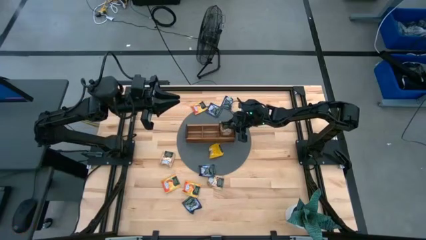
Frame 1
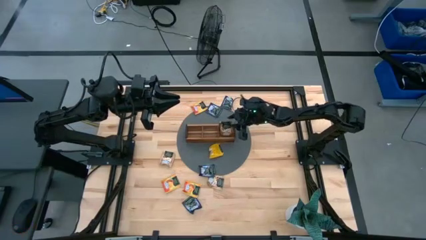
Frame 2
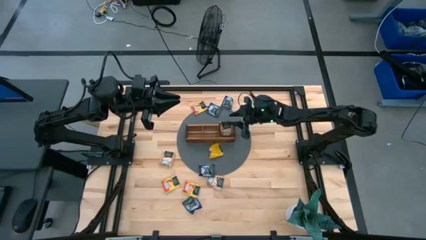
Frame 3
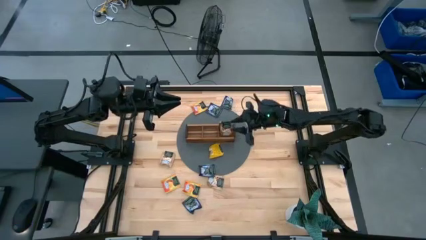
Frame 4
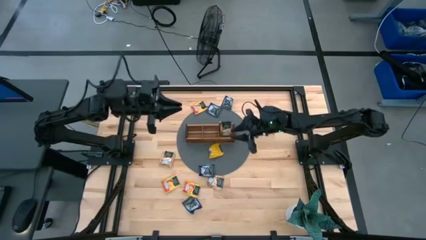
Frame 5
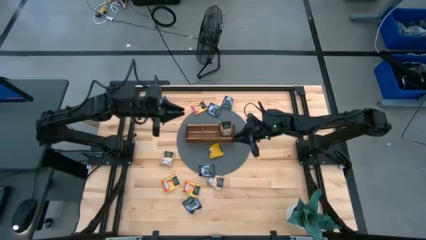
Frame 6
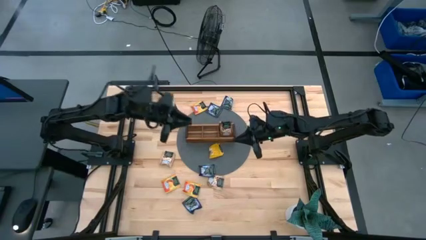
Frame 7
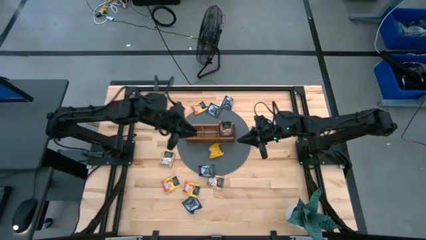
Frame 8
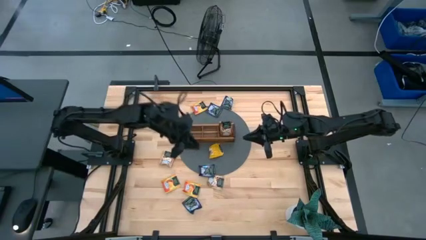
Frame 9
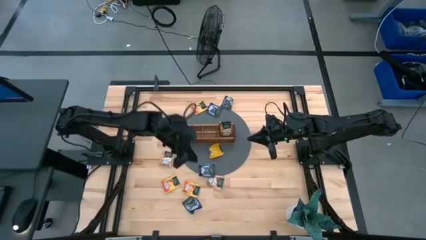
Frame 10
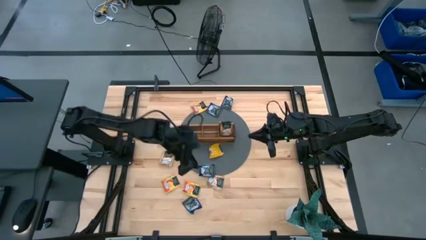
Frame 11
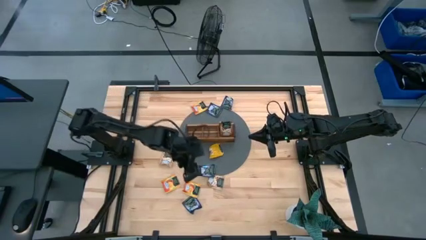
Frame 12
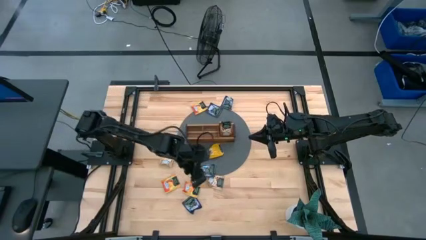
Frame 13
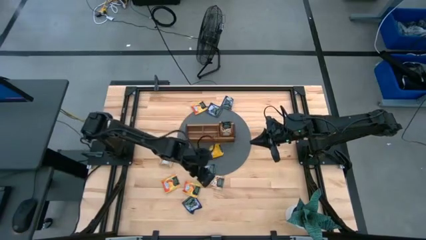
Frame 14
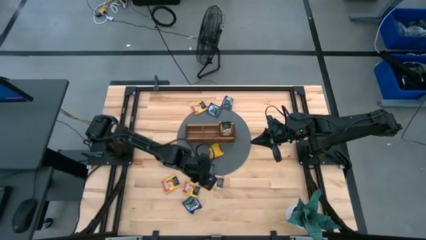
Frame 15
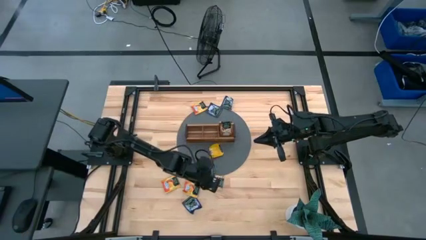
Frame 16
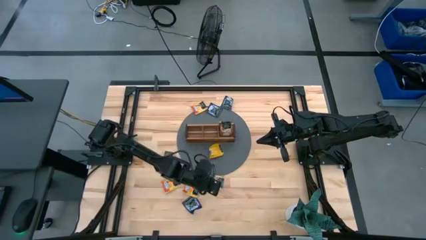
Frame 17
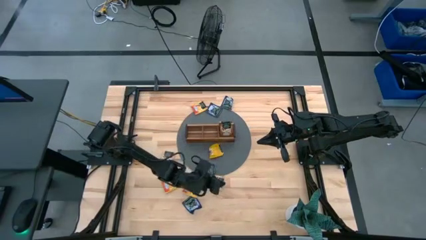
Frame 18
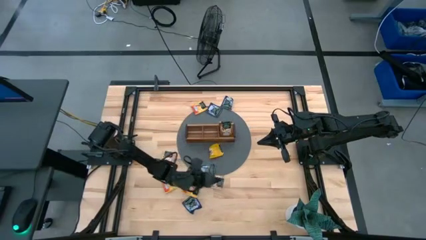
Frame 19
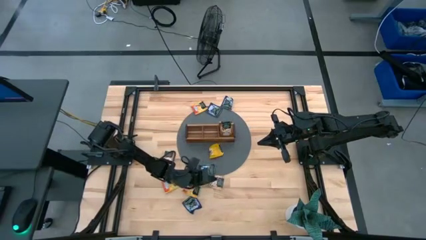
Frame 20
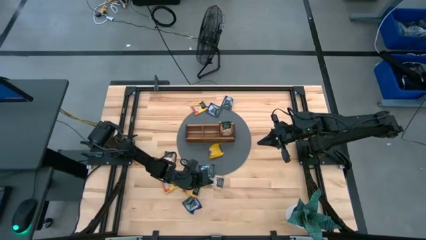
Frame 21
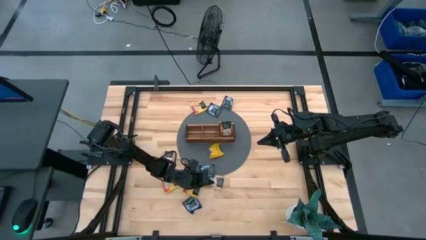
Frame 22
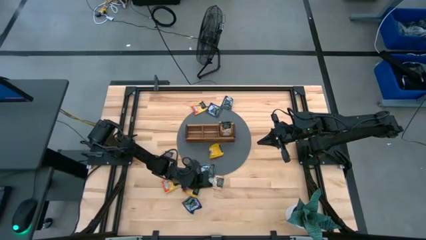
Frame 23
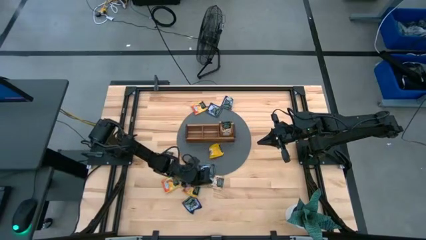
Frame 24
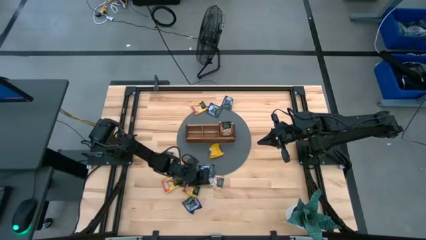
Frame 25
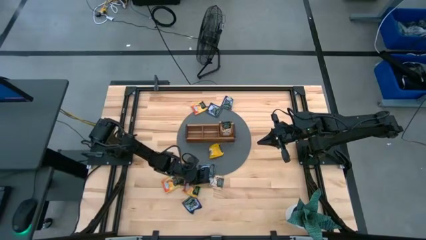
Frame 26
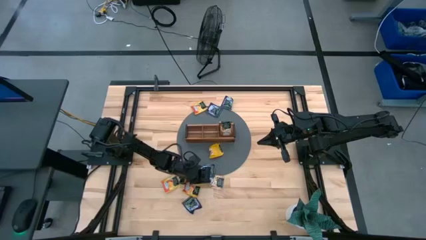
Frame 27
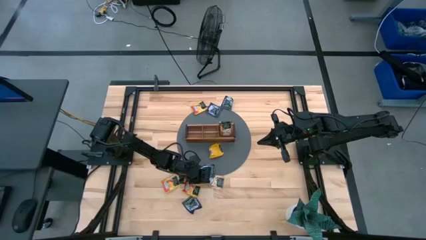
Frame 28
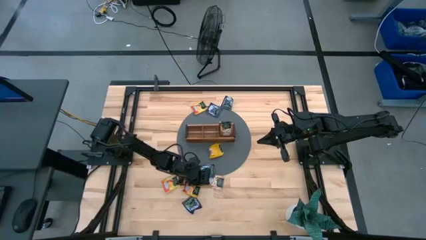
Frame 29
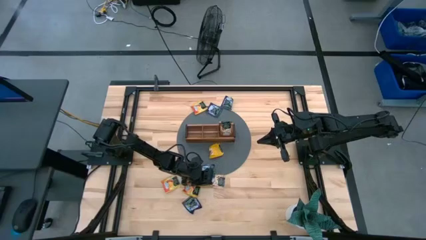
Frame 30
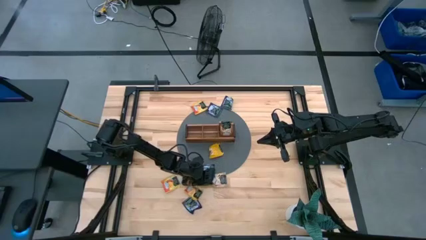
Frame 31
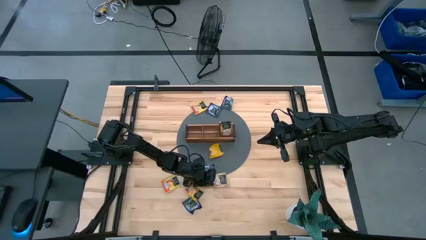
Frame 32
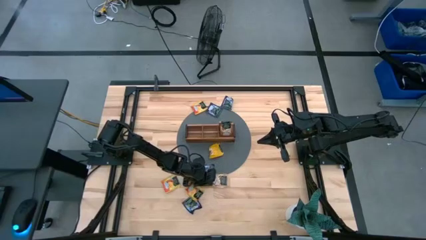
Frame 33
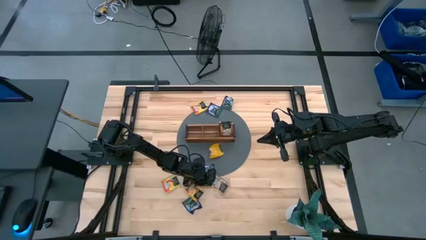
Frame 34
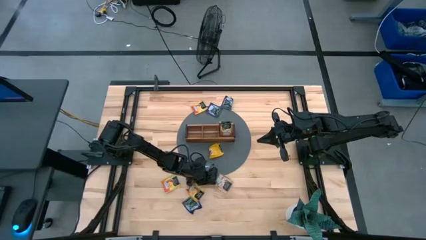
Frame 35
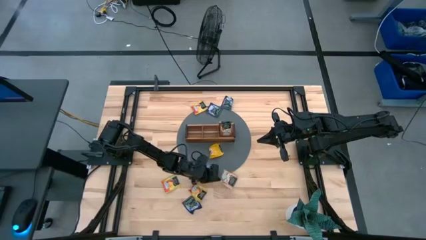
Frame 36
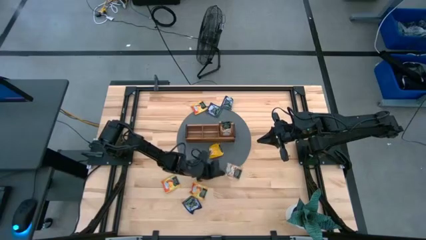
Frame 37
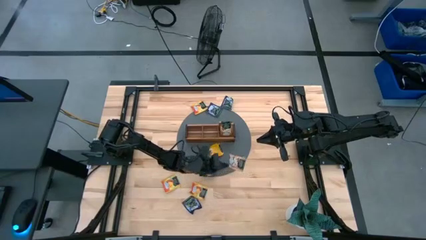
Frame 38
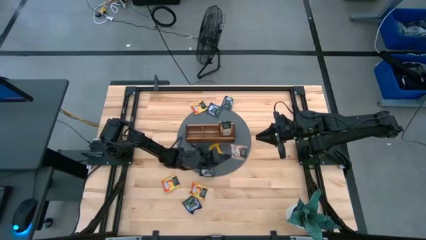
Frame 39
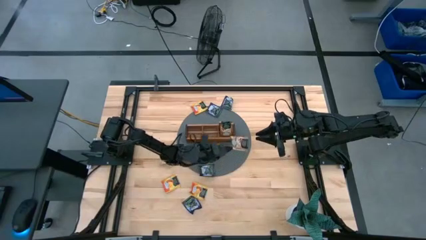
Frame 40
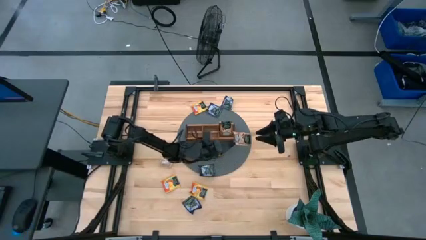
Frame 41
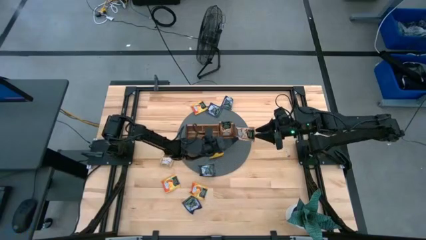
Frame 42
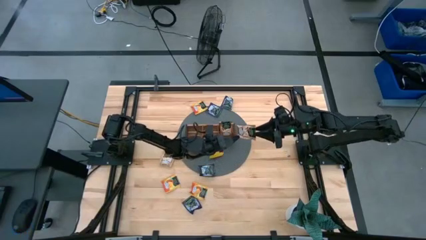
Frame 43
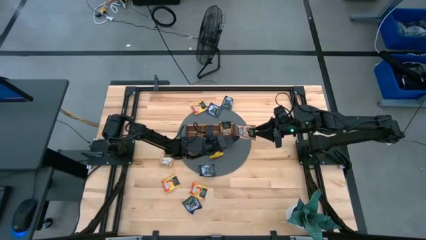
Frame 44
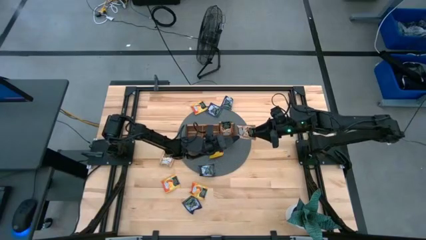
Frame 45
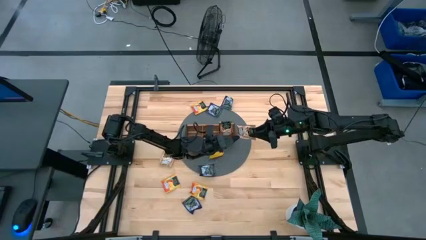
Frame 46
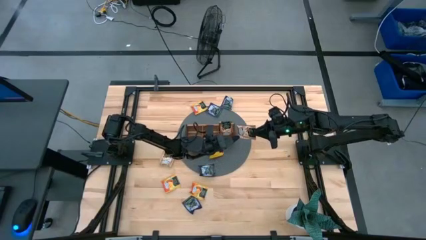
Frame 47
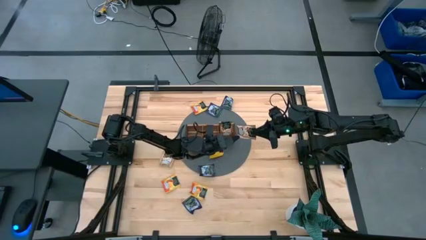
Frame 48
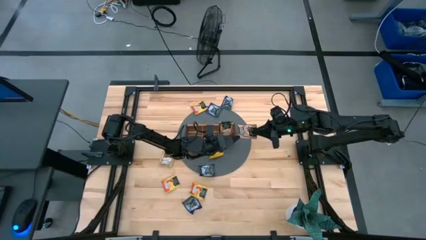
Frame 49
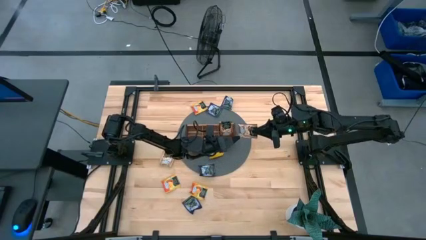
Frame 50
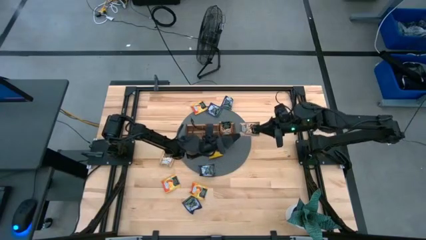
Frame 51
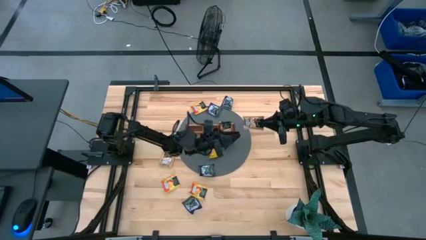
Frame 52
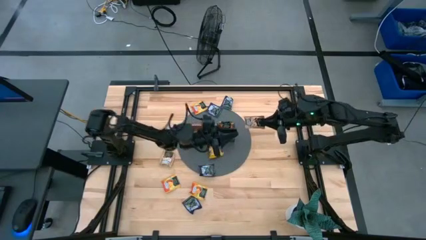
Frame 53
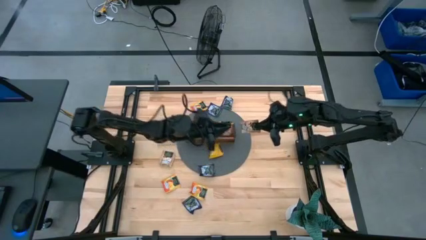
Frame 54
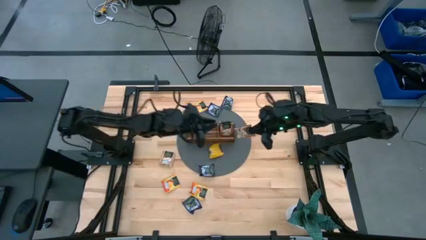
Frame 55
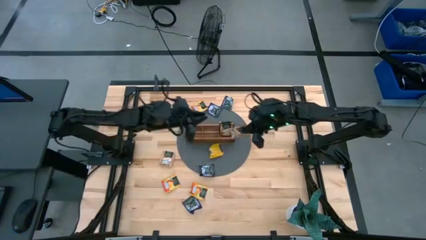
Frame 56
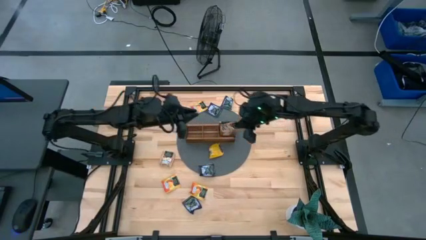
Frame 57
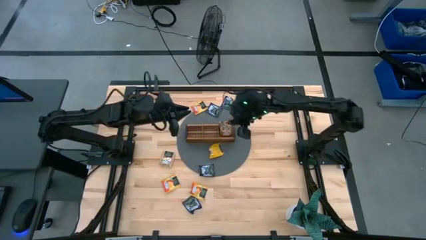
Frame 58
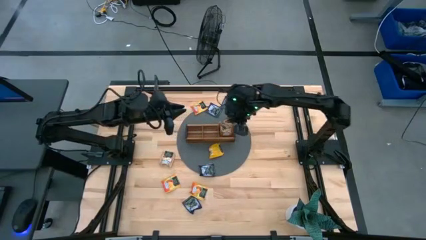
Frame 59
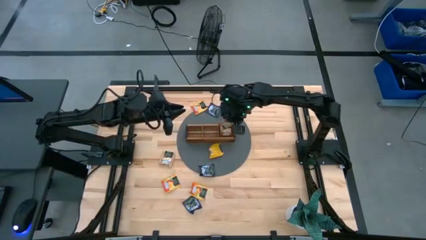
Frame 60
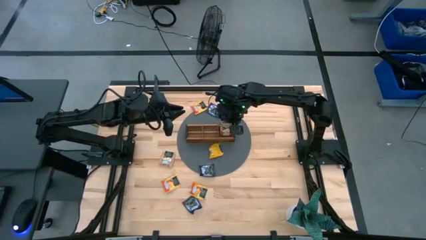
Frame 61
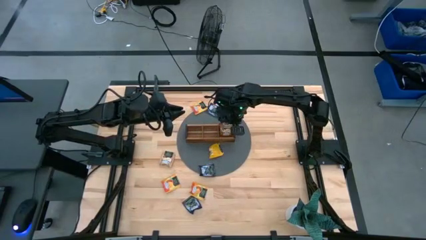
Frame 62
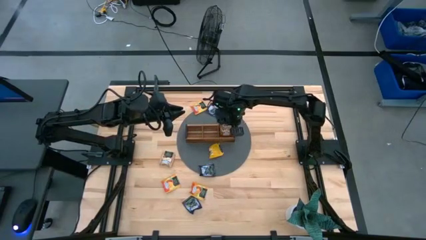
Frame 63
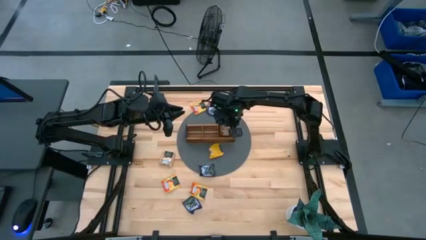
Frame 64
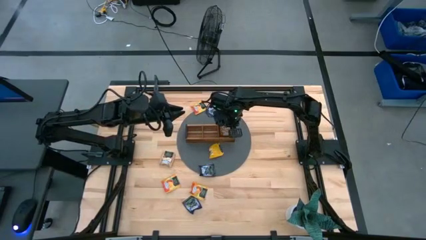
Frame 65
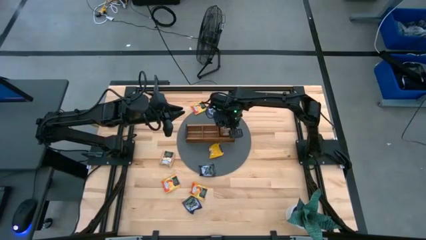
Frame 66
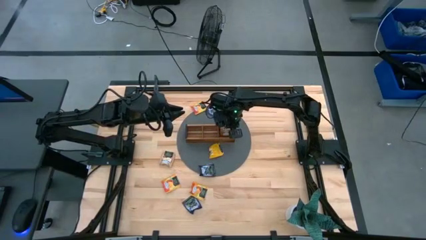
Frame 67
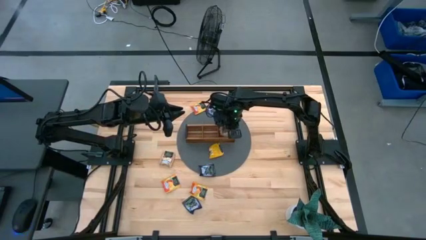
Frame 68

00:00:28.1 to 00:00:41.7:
Task: Pick & Place Tea
Put the brown tea bag into the right section of the wooden organizer
